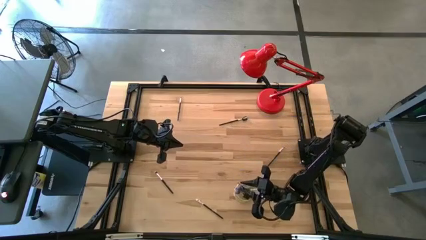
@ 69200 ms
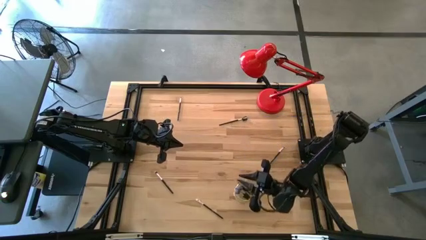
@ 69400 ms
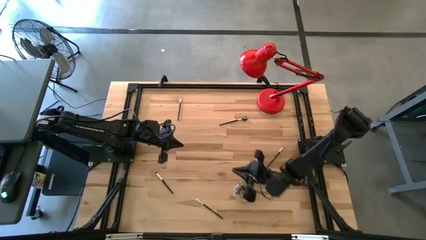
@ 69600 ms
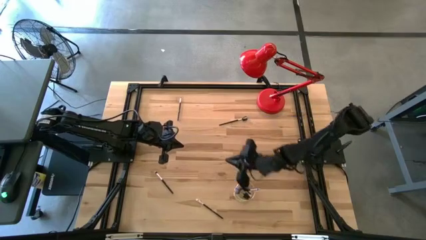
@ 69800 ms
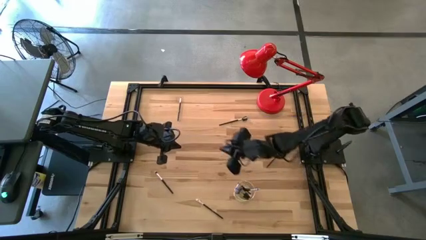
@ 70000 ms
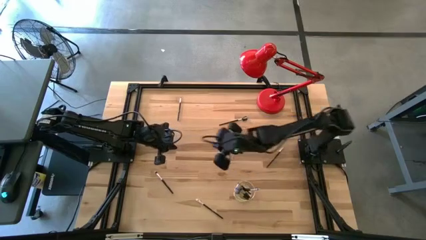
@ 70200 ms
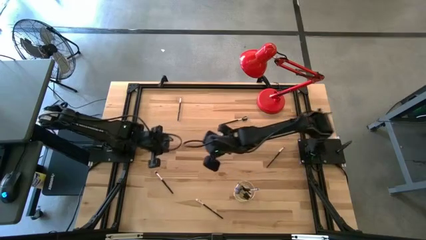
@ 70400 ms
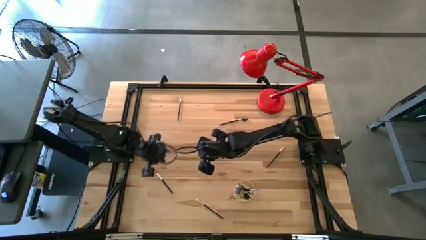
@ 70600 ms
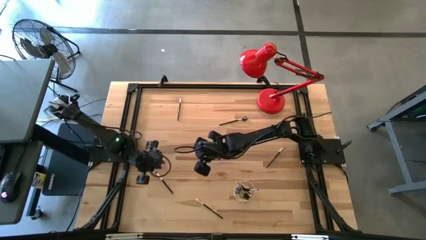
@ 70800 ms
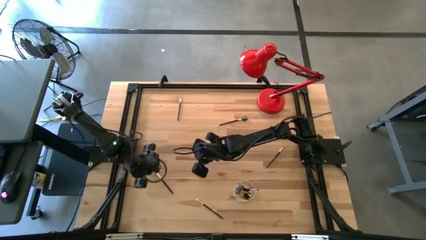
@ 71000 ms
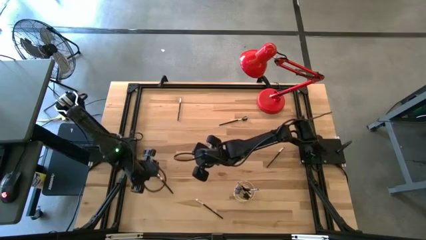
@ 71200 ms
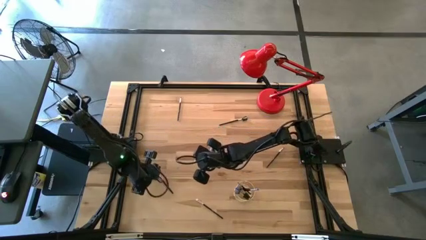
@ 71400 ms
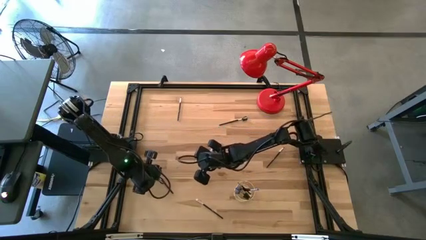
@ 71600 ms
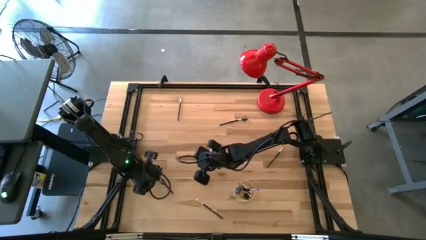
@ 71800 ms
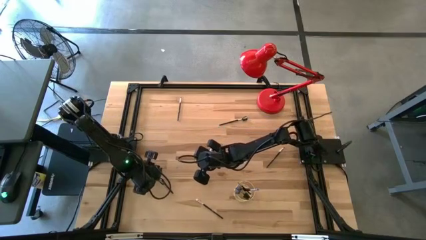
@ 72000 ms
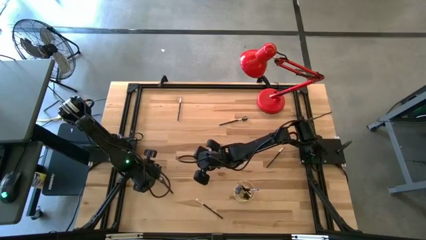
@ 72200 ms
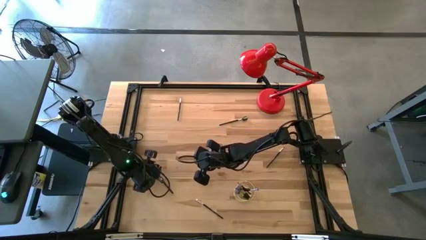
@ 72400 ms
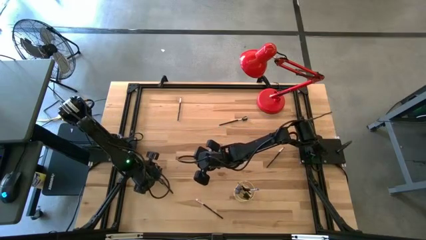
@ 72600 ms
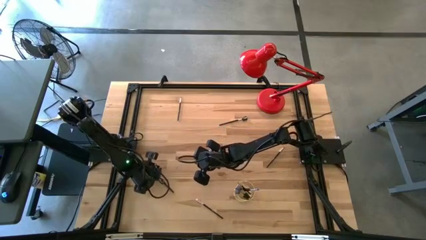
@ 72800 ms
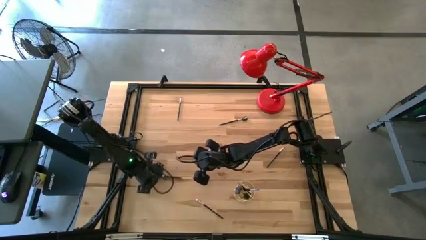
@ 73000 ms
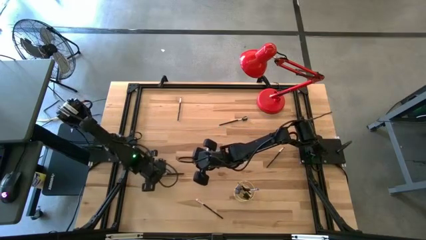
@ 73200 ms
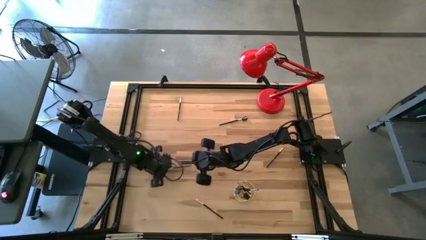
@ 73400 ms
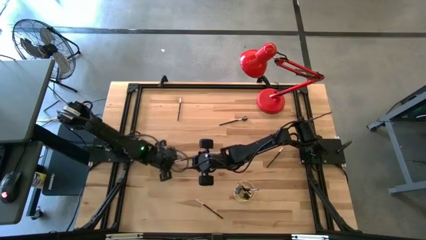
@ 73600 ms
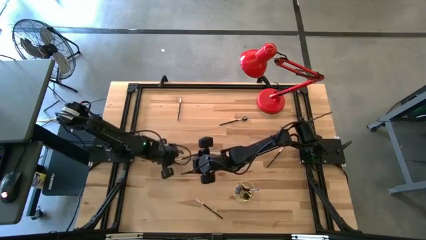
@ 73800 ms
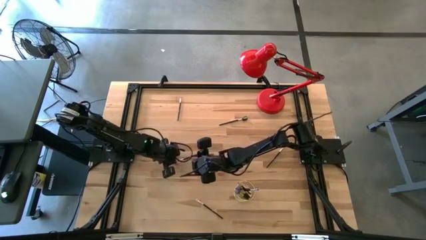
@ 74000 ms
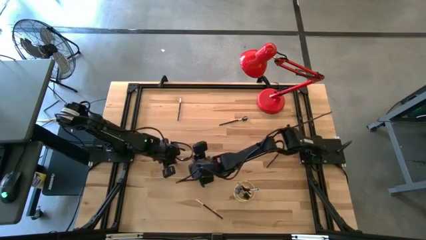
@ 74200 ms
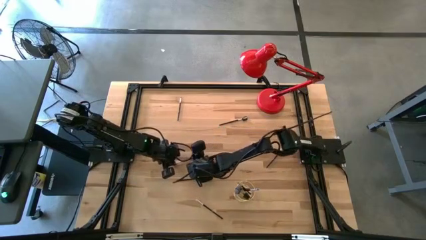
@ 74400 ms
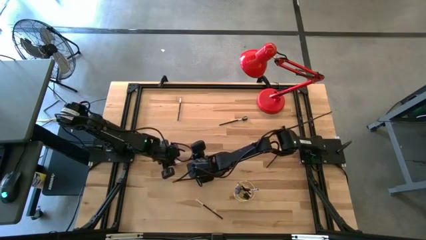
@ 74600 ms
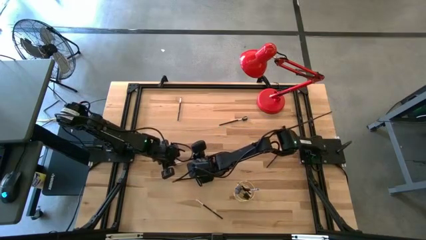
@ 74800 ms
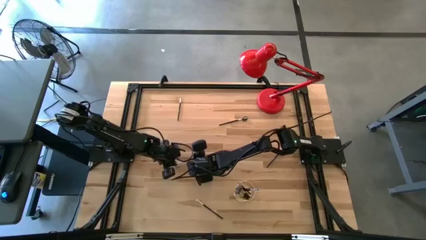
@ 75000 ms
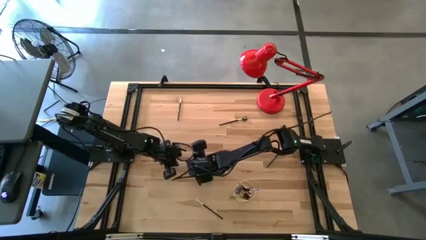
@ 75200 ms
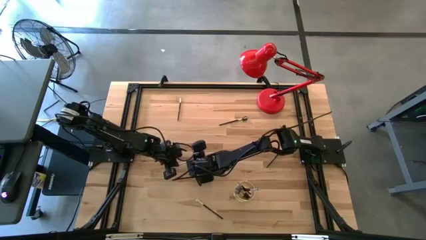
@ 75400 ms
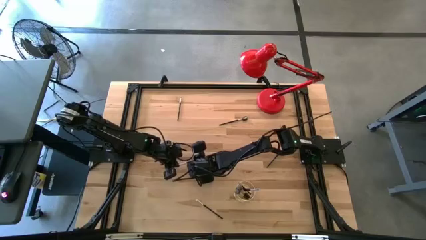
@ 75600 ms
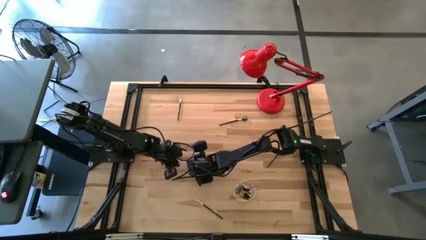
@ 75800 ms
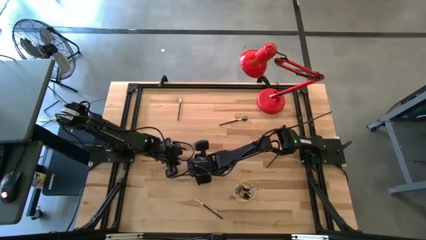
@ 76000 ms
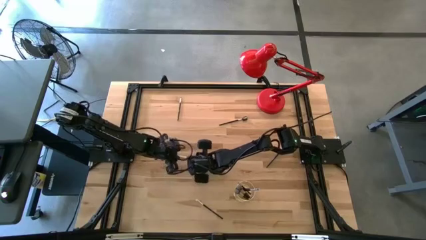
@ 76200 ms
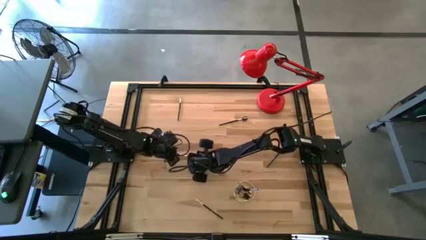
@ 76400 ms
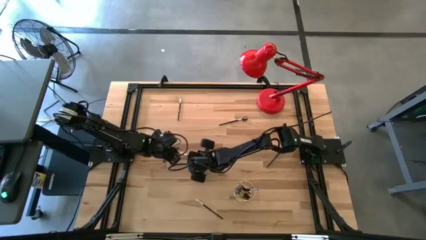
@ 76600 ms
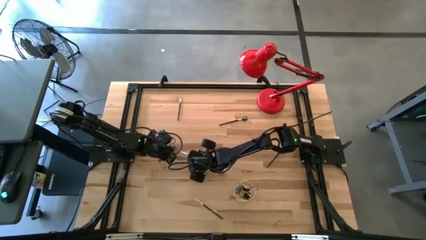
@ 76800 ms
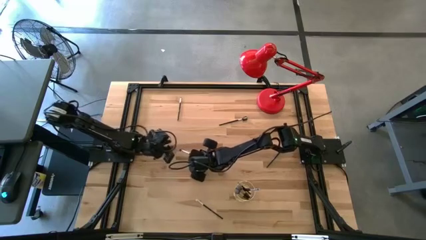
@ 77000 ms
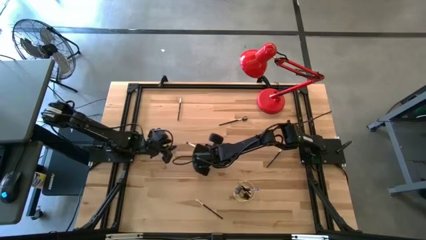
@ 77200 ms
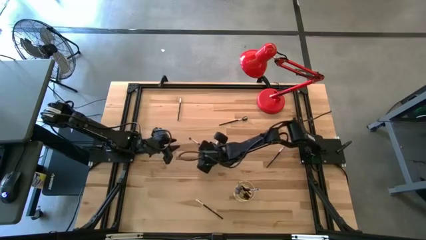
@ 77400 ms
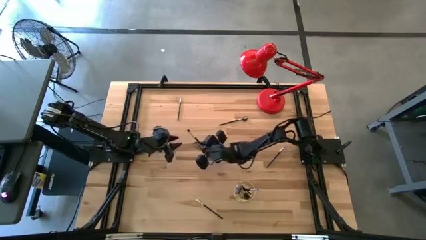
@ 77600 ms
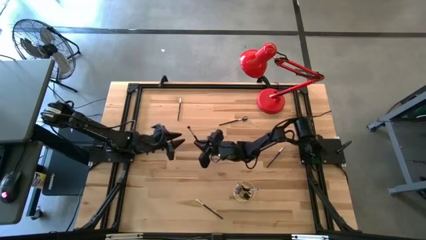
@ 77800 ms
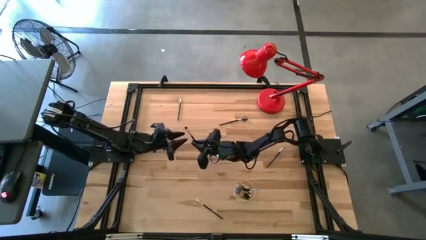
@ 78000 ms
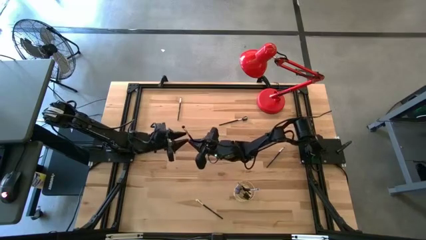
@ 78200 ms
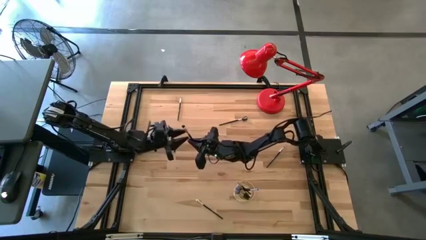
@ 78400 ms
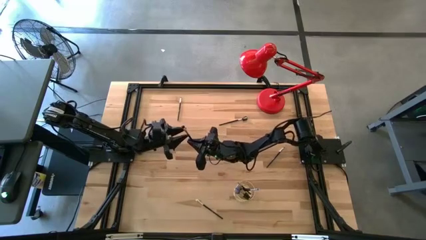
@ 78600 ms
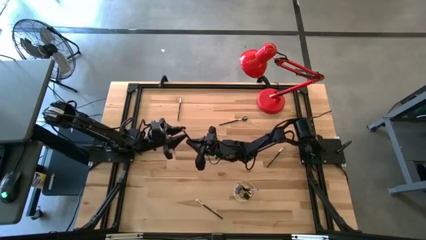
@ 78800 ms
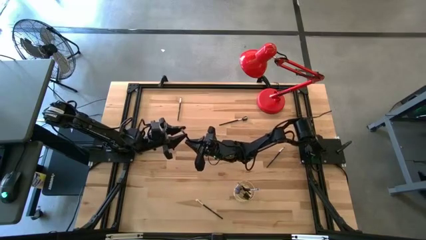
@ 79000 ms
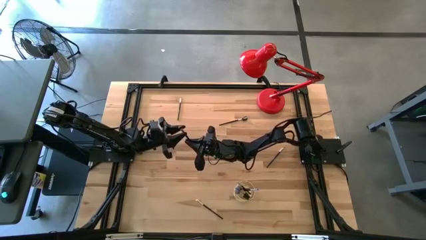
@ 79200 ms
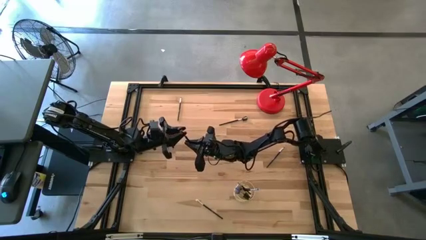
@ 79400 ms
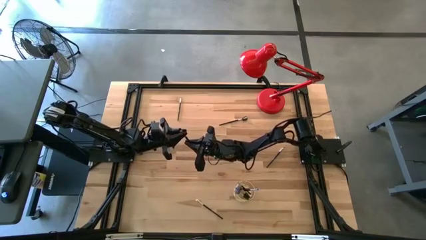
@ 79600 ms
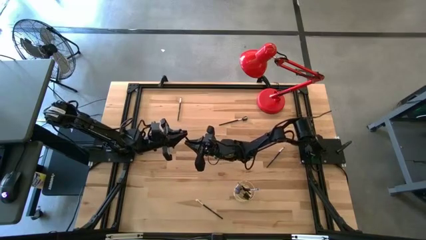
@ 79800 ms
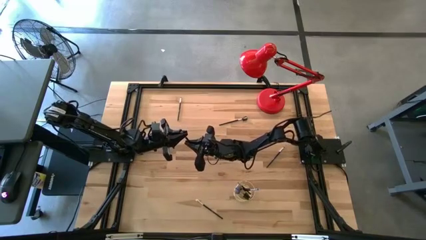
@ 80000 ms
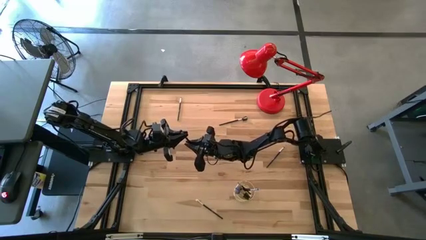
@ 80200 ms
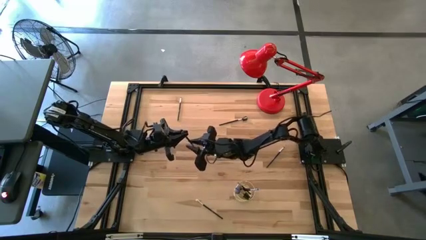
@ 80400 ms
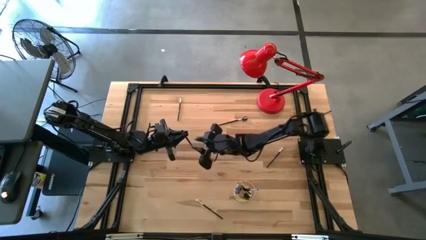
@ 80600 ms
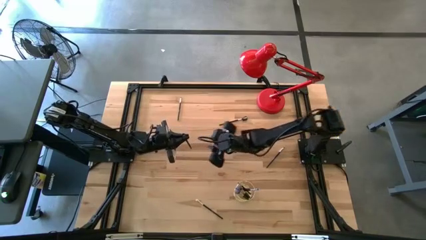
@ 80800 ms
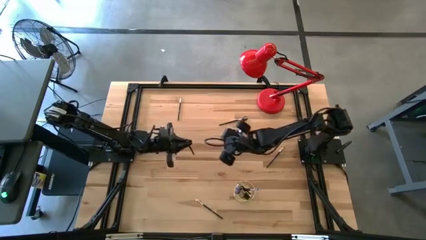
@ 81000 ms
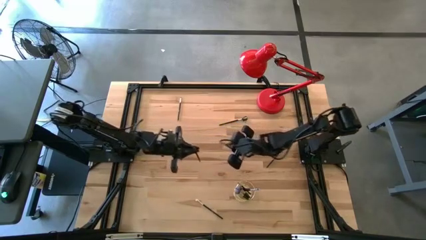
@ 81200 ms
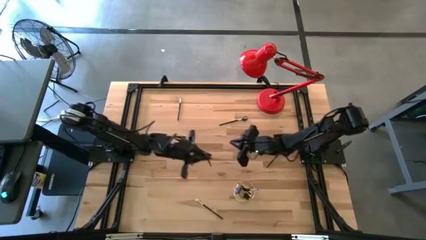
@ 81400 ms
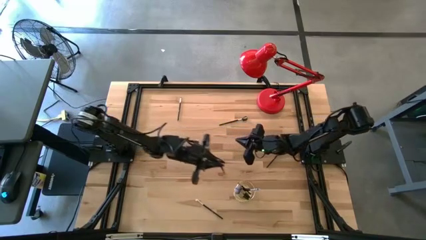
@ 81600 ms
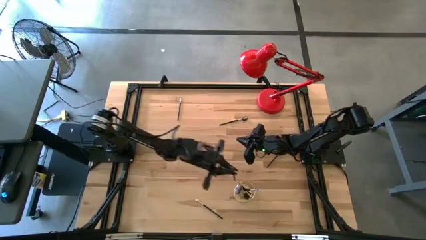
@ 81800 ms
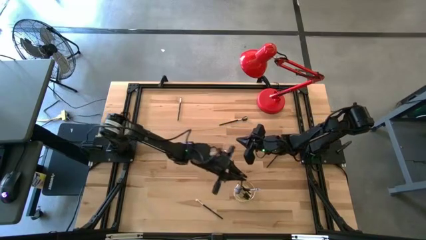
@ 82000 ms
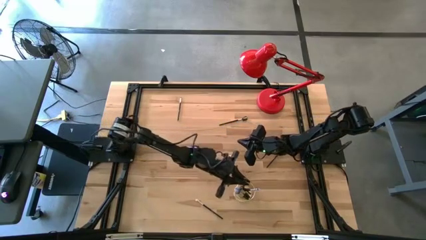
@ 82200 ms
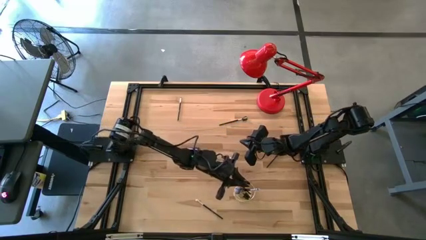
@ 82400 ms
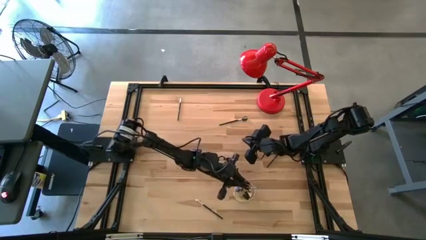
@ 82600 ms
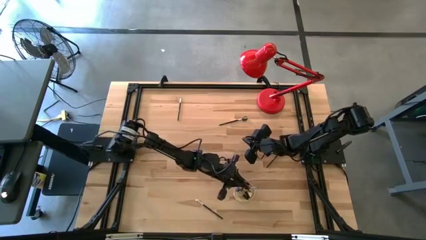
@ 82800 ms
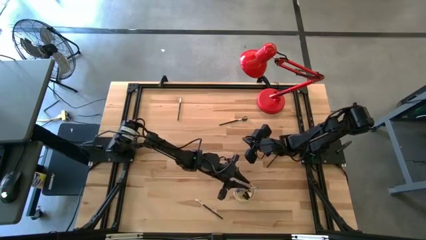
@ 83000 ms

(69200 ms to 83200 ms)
Task: Pick & Place Makeup Brushes
Put the eyeshadow brush into the gold makeup holder

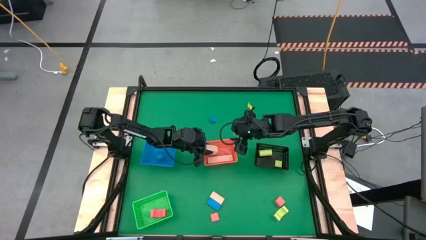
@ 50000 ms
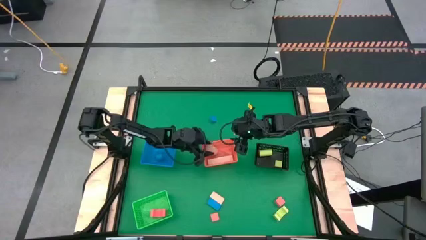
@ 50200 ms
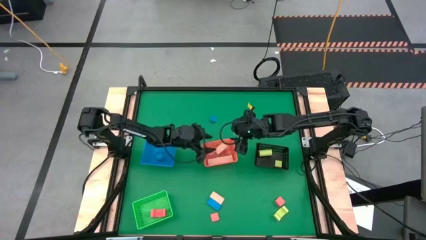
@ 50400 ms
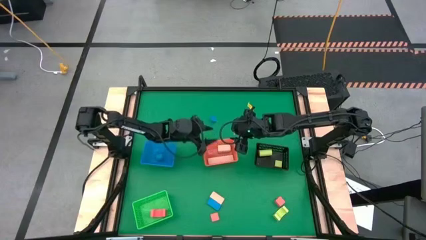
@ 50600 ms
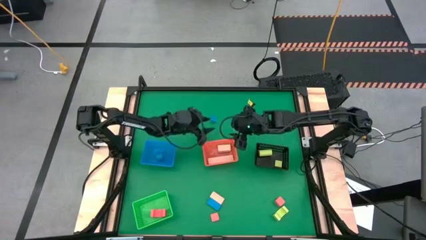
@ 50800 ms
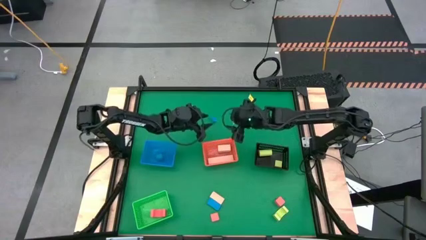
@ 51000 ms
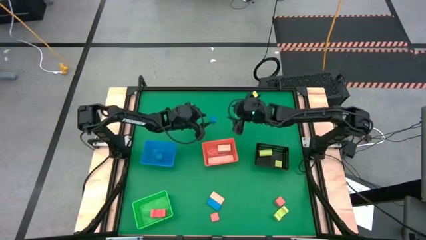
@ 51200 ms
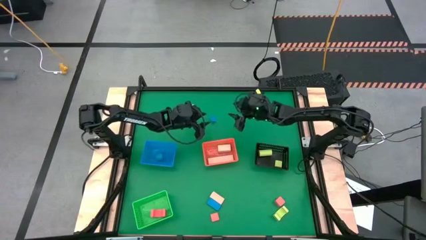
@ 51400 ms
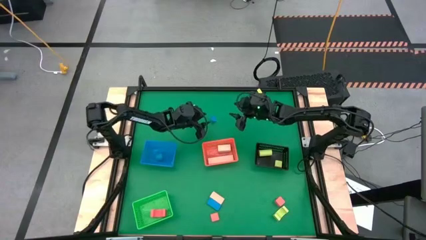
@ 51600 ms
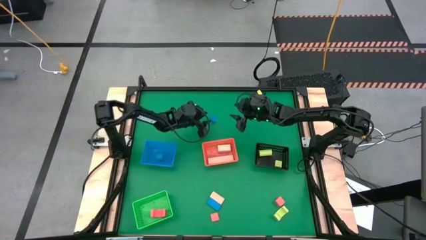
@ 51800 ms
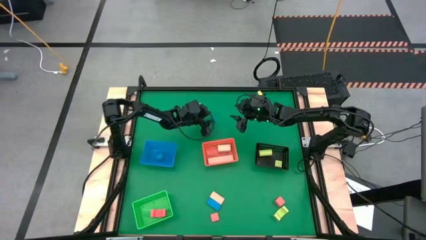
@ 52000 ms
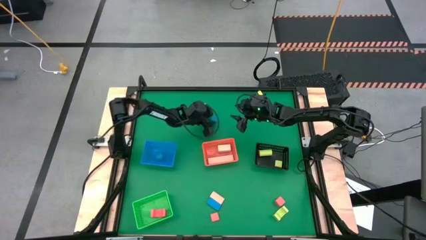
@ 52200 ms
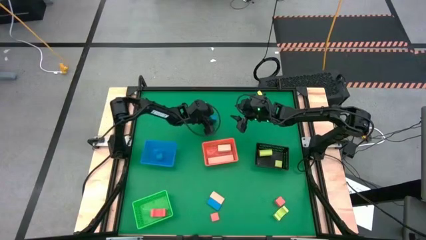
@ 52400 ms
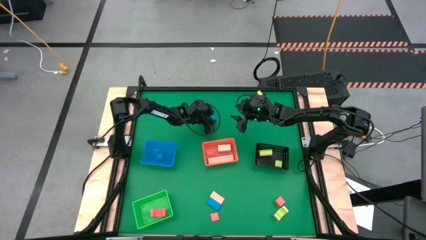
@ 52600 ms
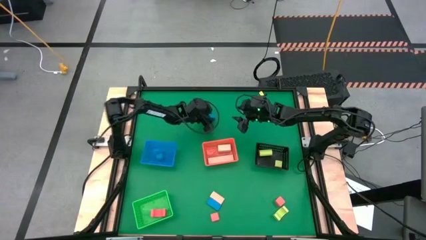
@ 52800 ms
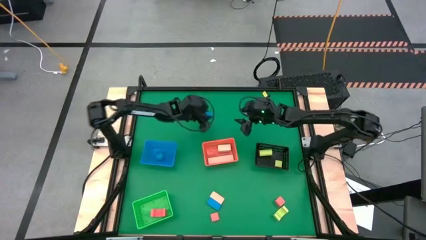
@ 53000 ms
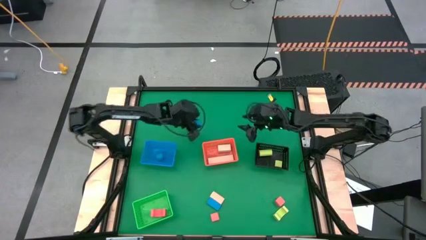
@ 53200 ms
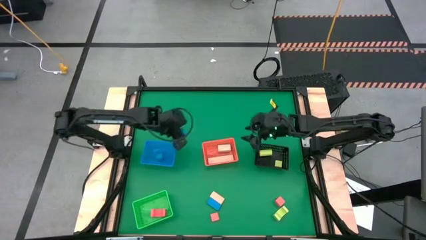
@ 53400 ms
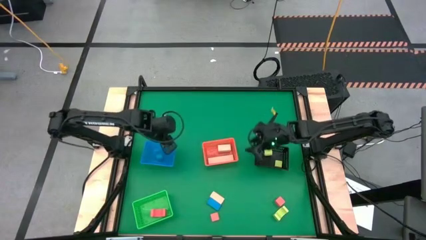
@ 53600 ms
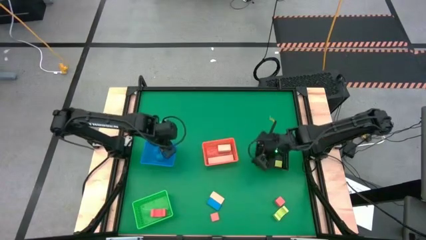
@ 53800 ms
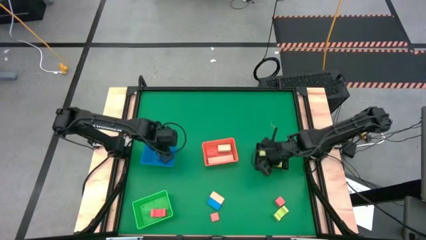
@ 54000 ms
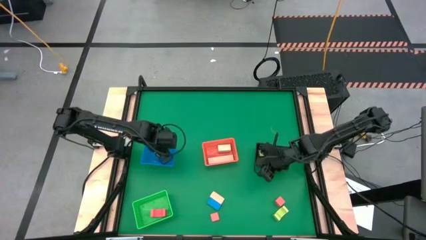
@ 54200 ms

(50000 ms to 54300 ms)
Task: Sort & place blocks by color
Put the top blue block into the black bin
